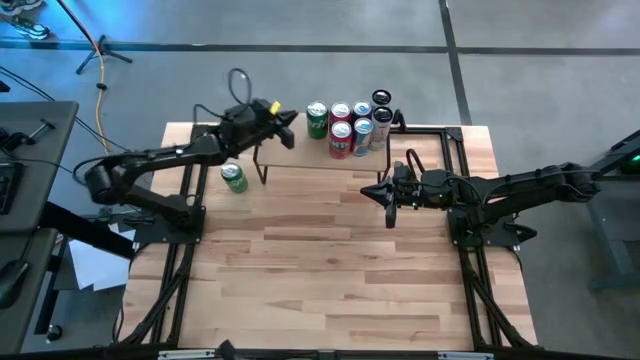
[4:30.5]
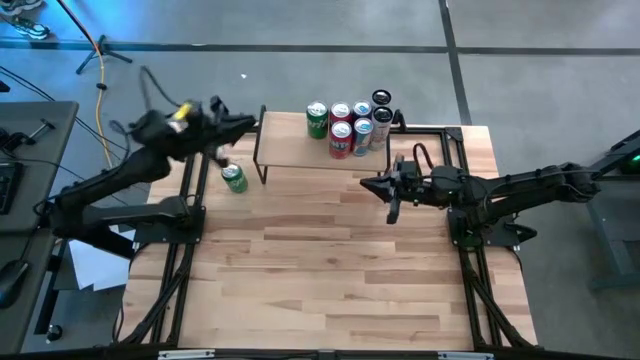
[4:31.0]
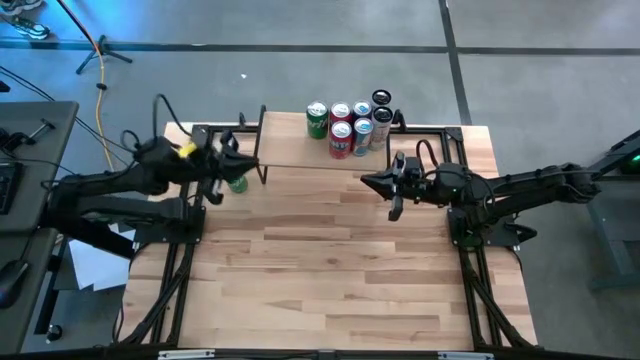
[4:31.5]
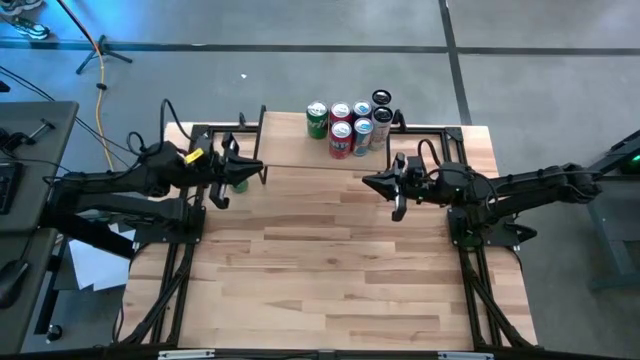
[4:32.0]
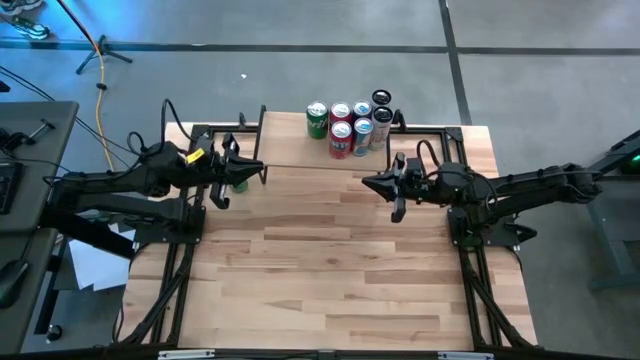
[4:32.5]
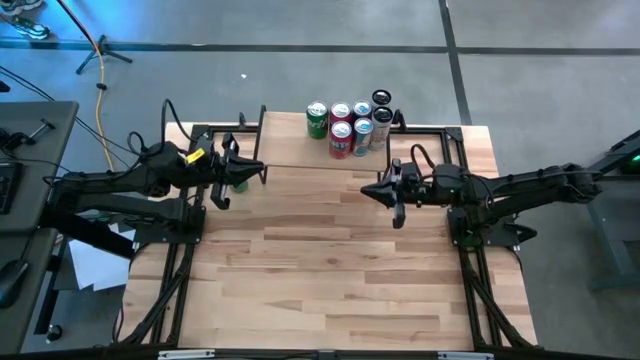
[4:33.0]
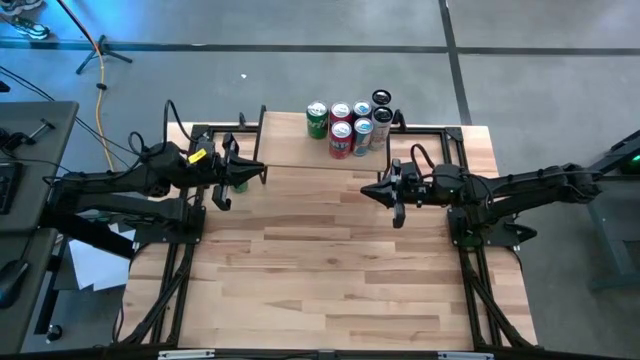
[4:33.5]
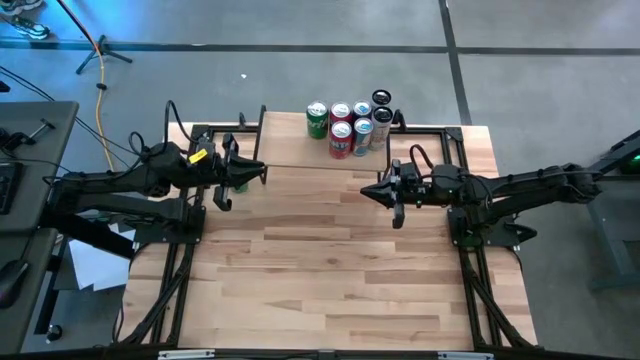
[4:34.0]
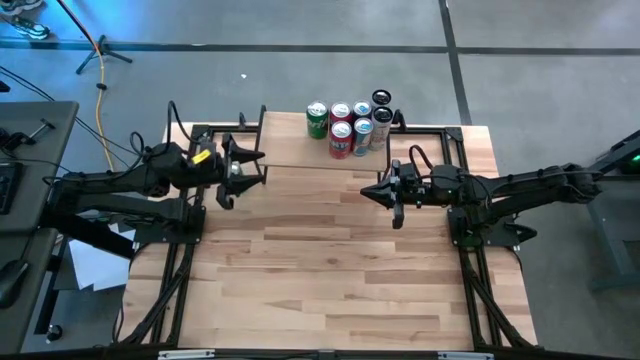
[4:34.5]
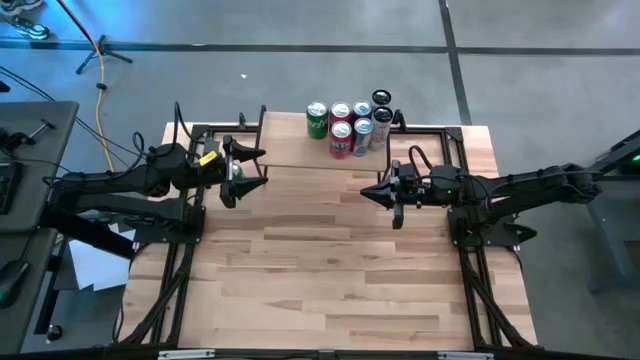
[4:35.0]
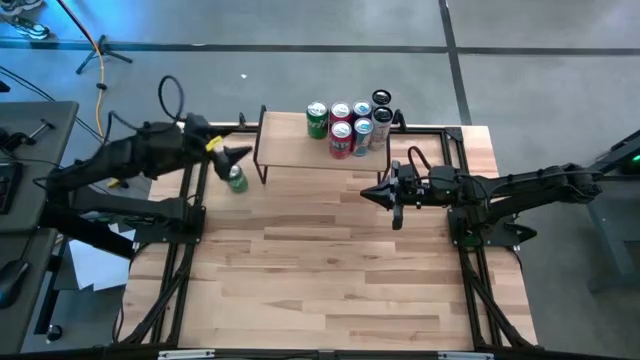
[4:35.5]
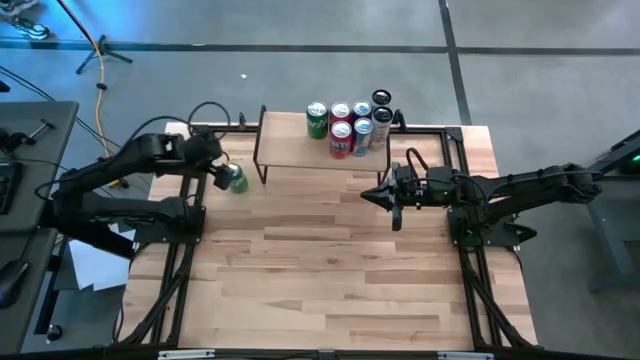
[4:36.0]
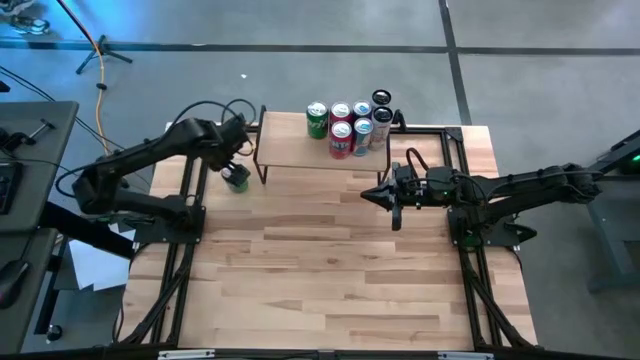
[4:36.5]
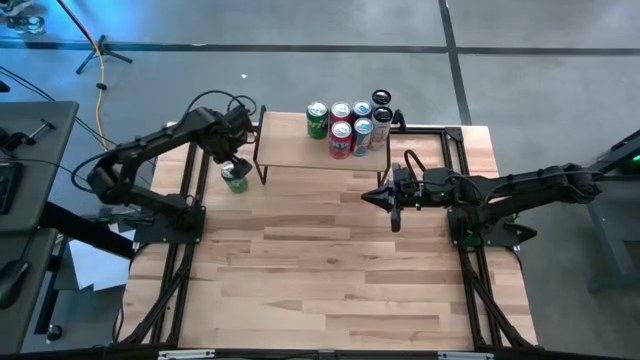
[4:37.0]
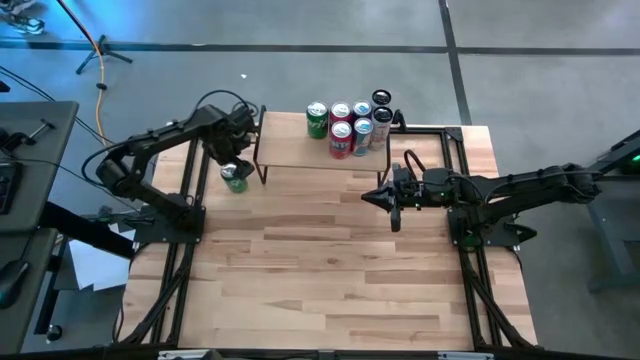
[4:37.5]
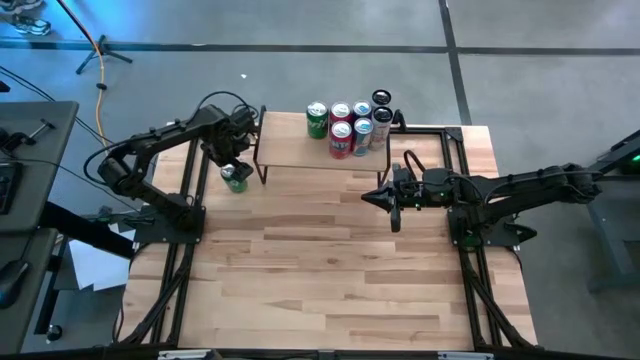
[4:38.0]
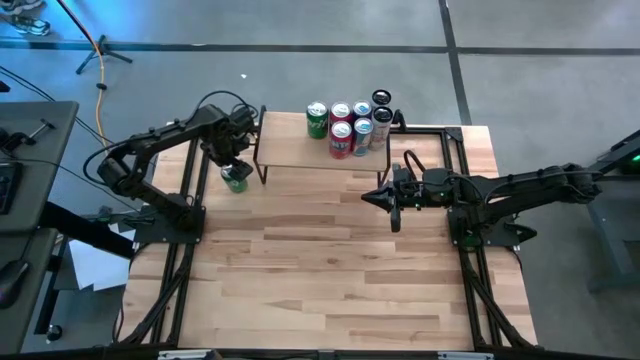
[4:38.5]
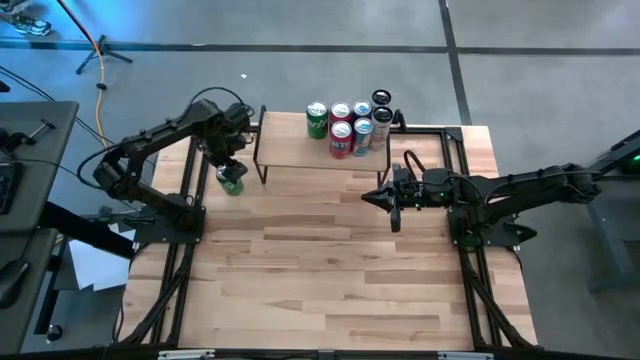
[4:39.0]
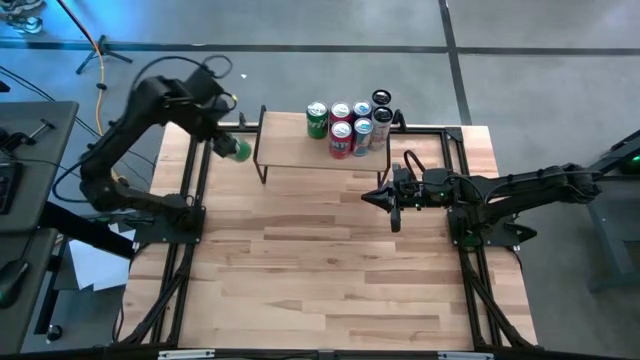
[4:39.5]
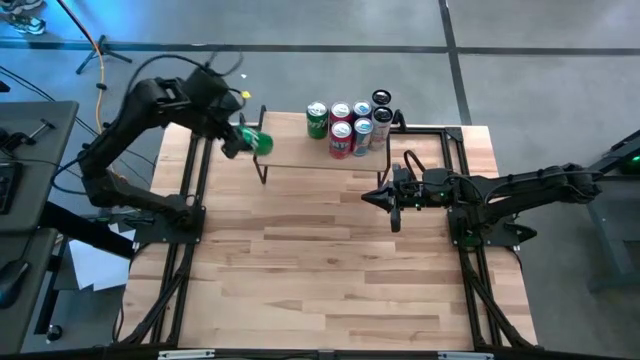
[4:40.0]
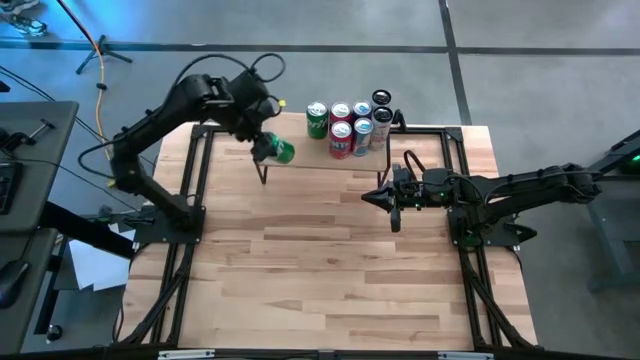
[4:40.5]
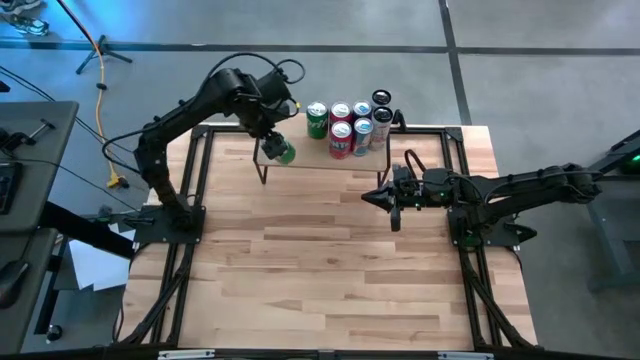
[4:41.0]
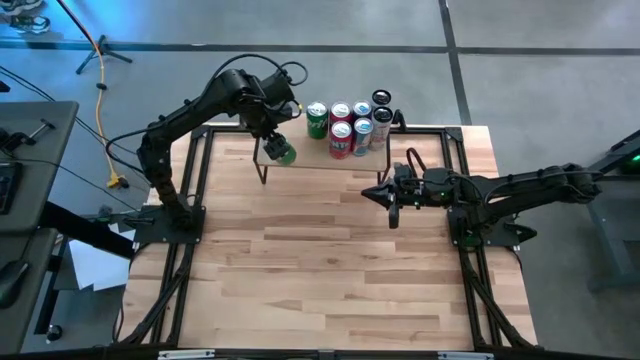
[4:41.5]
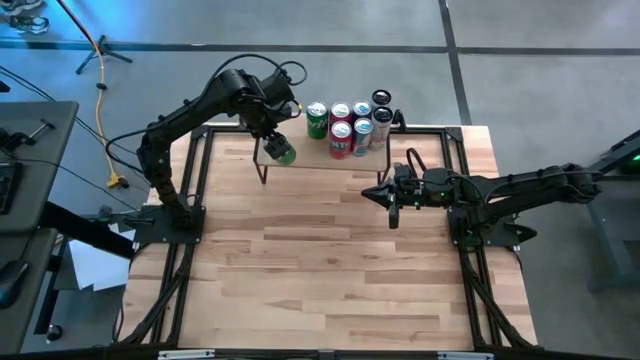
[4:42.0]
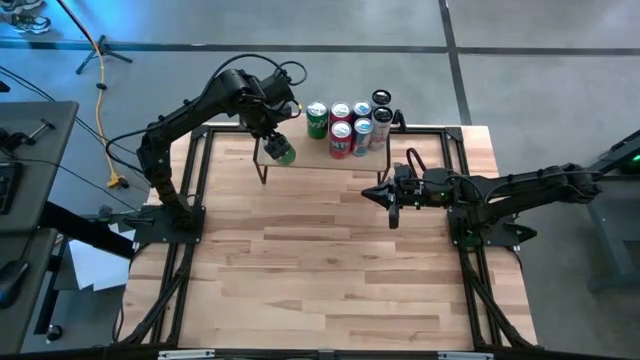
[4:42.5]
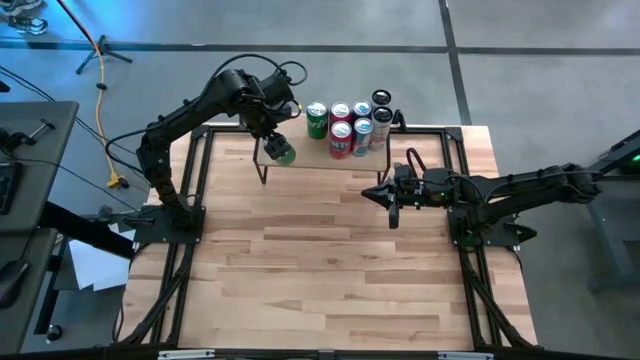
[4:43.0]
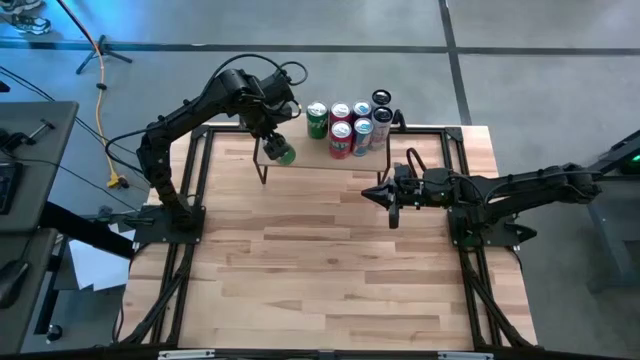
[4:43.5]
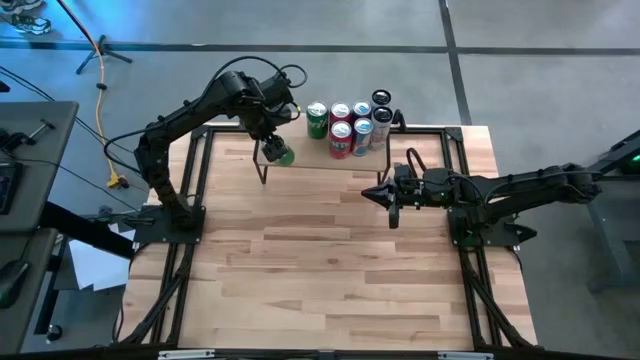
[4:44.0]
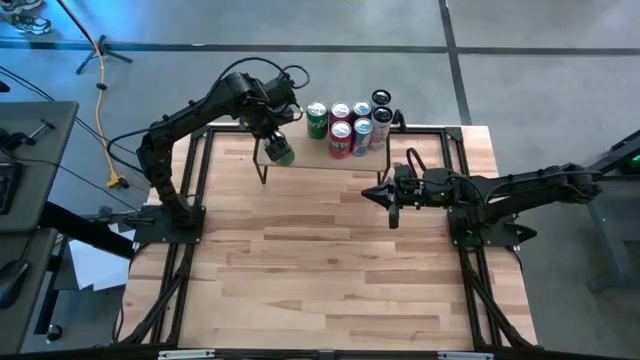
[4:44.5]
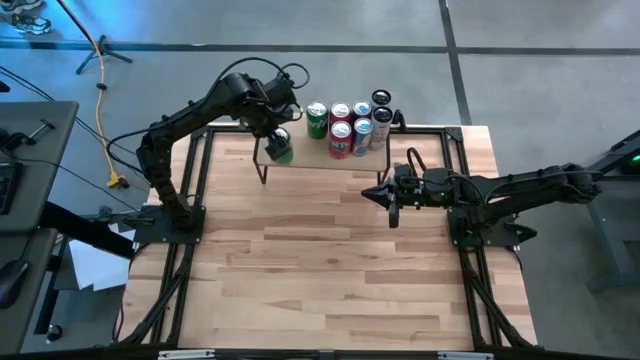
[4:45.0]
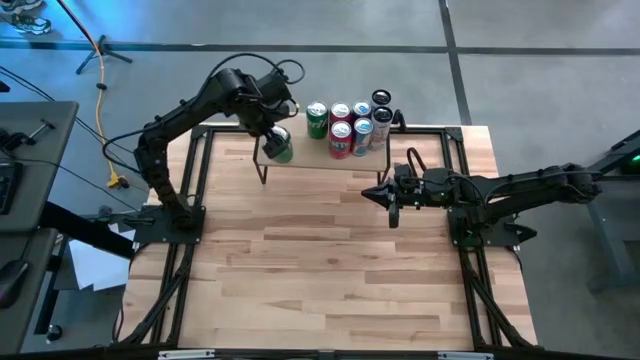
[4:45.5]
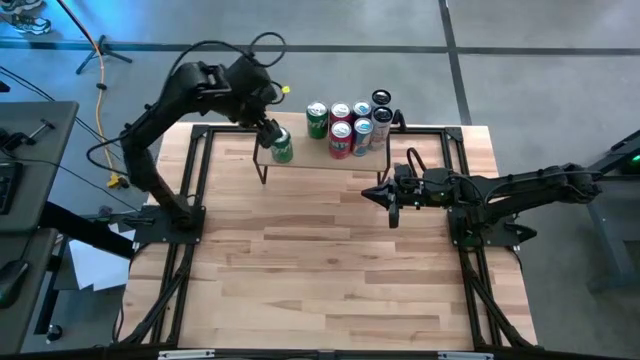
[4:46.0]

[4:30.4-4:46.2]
Task: Place canned beverage on shelf
Put the green soda can on the shelf aligned with the other green soda can
